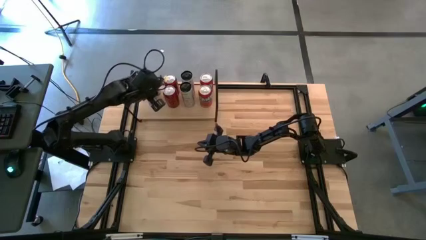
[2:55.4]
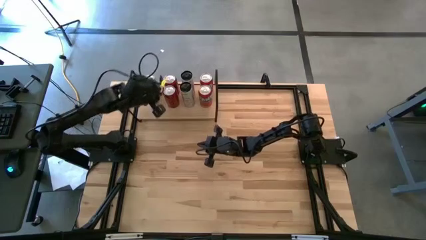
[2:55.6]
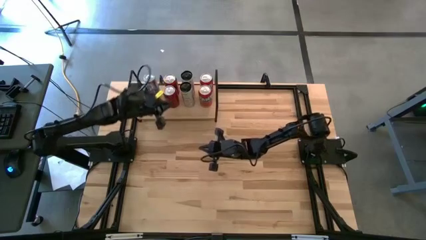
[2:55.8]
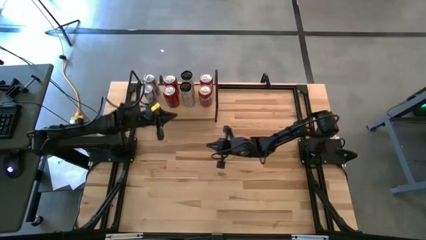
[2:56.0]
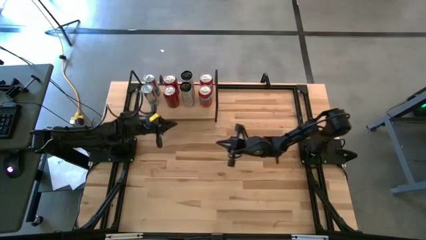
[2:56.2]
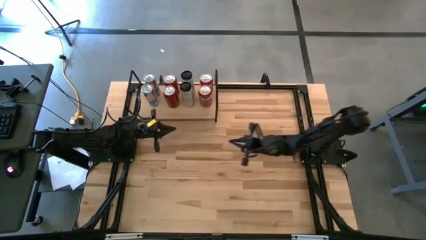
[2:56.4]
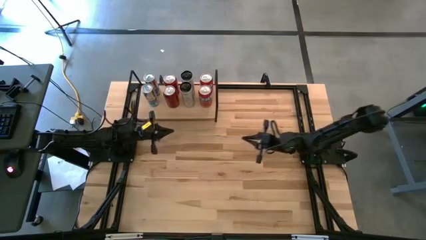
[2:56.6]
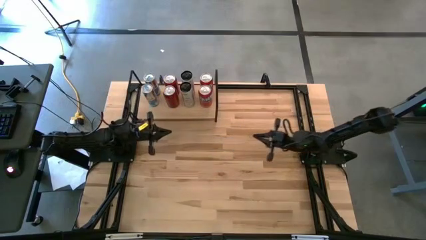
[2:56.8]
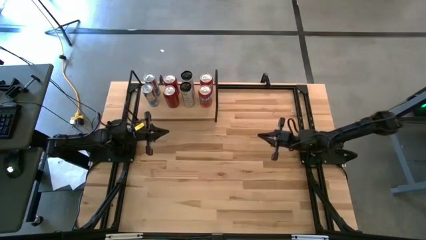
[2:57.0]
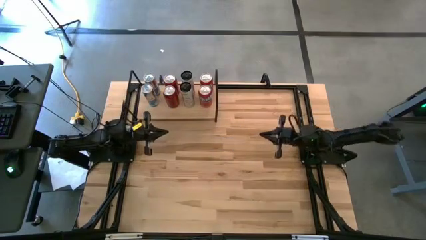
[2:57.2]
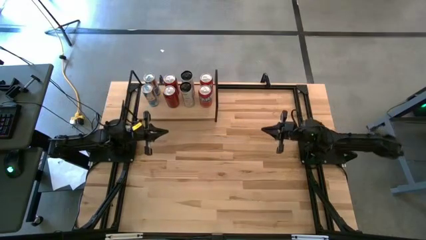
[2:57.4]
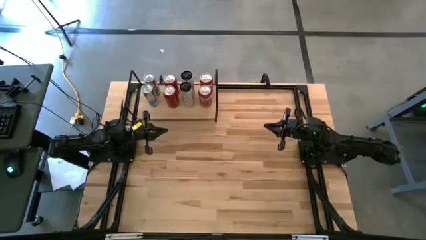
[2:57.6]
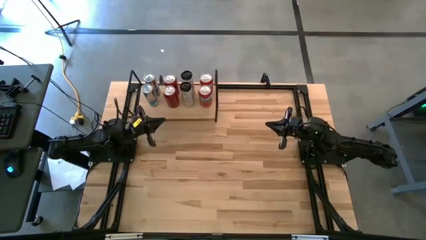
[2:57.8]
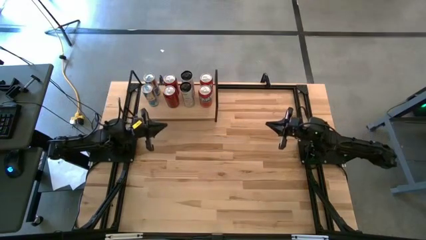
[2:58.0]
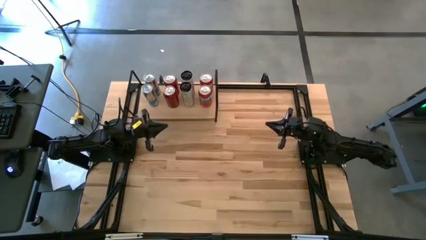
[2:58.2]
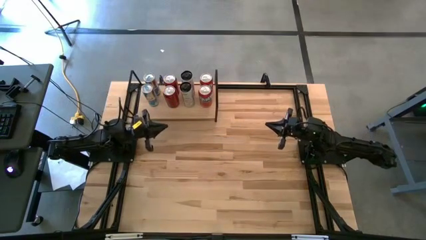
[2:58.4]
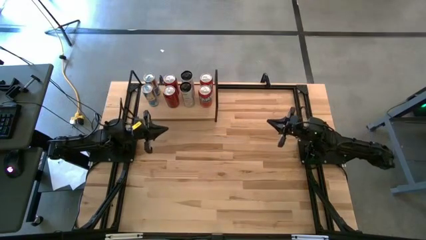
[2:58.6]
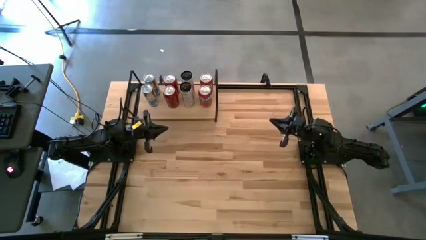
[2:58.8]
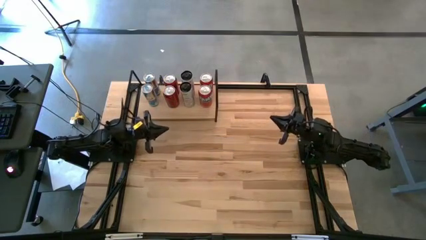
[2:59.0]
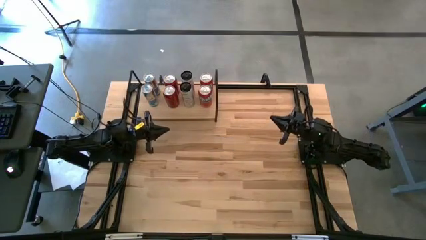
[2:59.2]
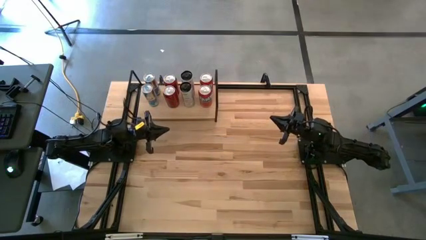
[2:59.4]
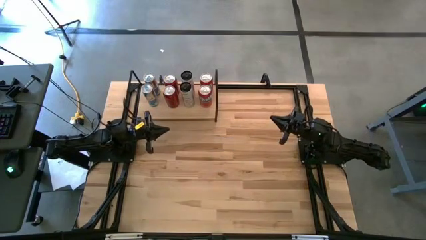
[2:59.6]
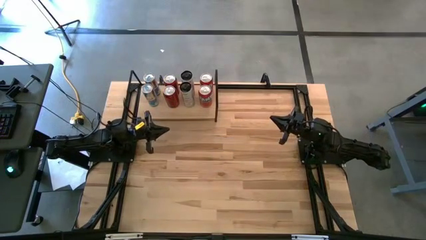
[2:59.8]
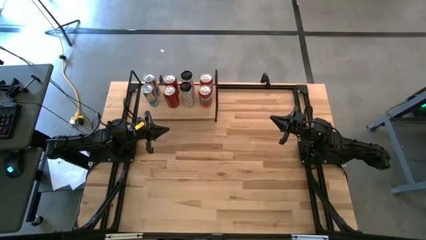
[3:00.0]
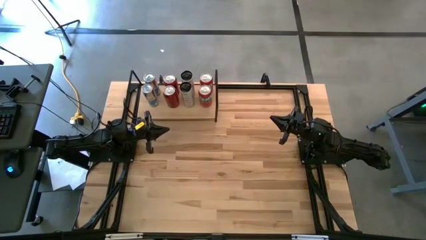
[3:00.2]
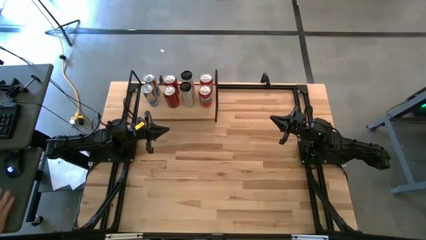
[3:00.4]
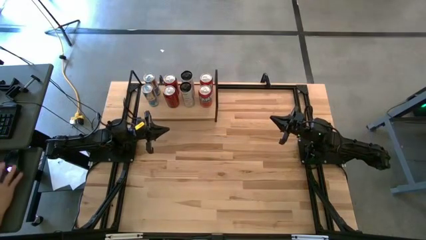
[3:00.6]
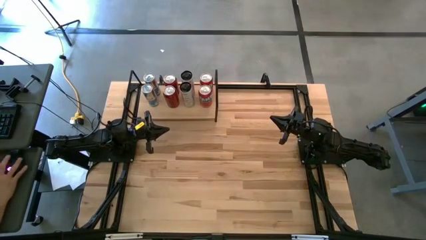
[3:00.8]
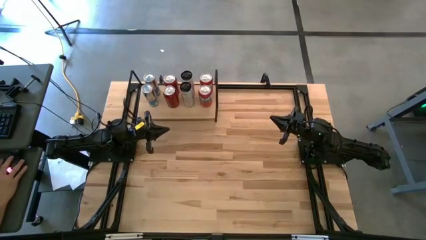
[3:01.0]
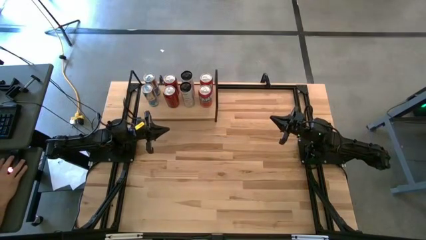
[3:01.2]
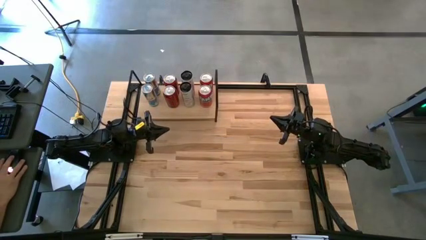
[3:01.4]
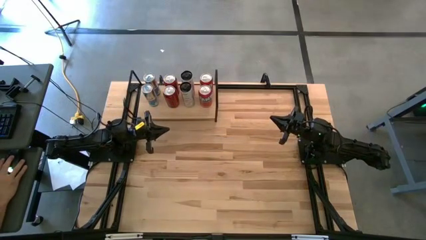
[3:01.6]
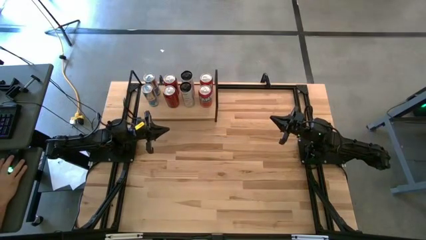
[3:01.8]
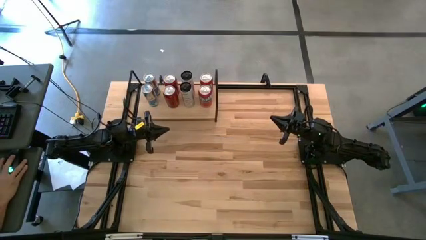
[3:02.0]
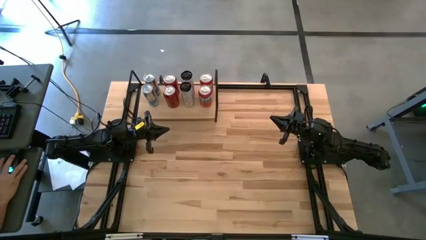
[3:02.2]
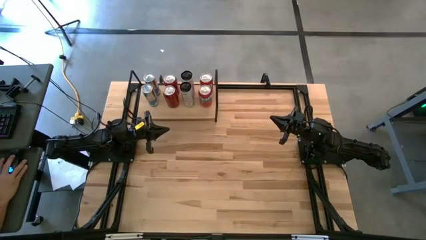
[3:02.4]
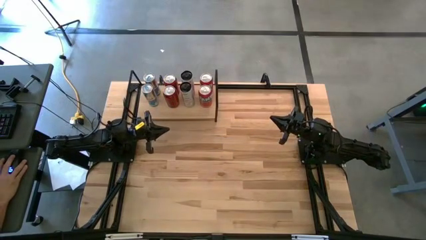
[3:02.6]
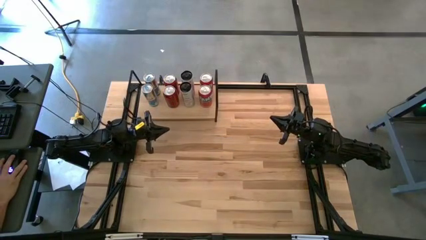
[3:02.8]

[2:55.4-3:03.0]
Task: Place canned beverage on shelf
Return to Home Position

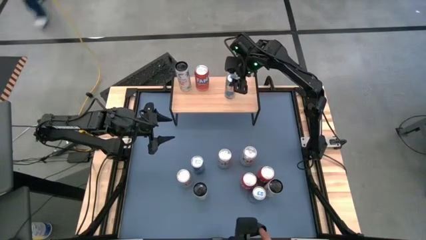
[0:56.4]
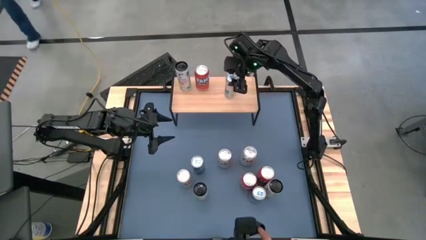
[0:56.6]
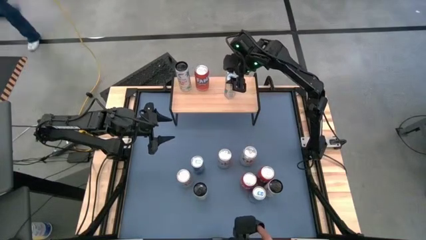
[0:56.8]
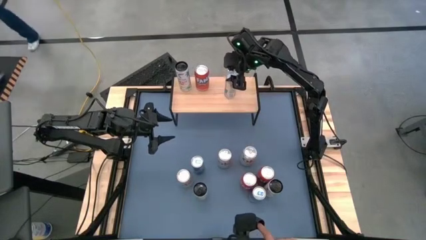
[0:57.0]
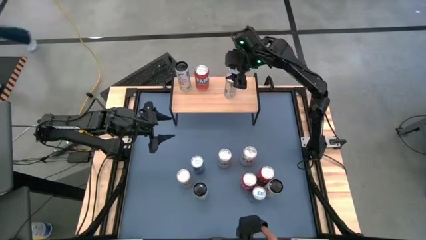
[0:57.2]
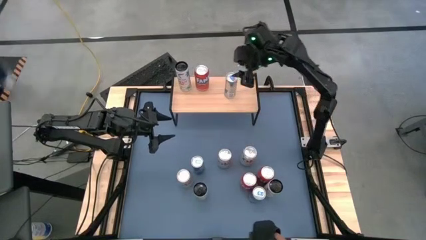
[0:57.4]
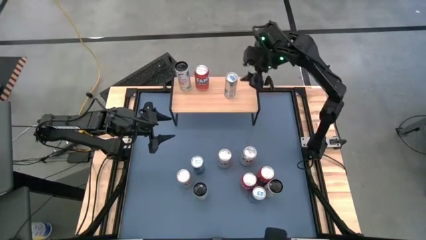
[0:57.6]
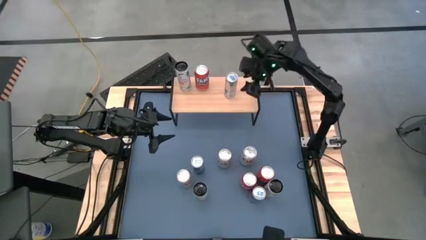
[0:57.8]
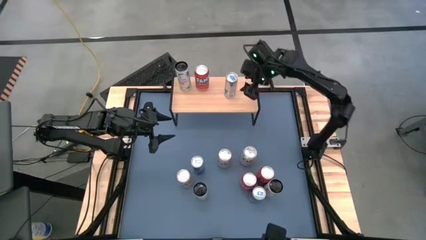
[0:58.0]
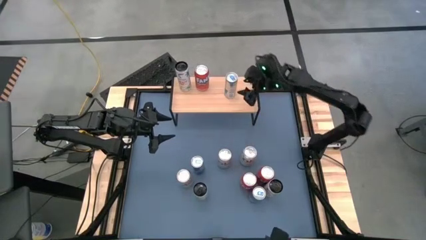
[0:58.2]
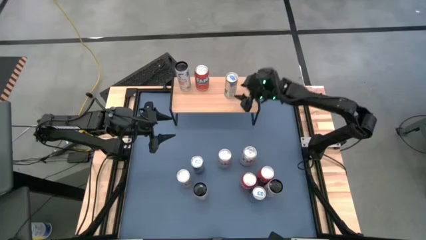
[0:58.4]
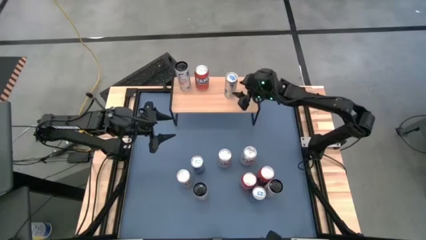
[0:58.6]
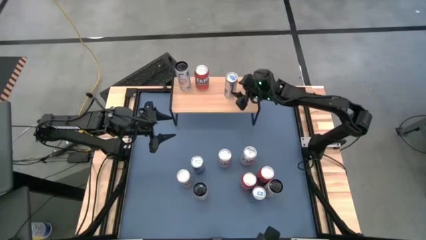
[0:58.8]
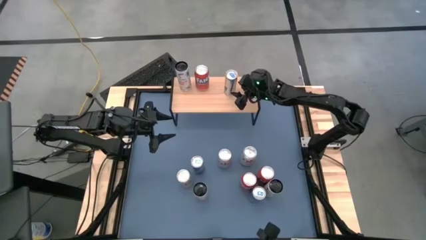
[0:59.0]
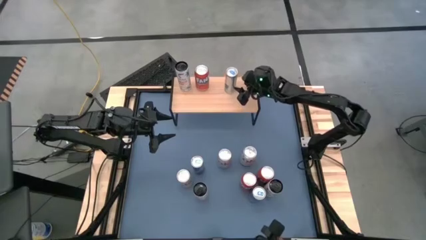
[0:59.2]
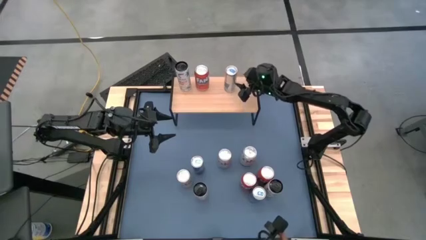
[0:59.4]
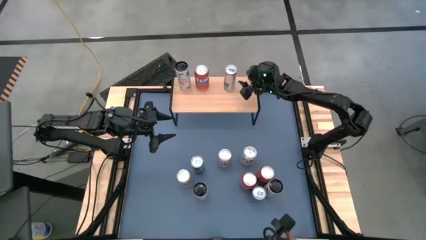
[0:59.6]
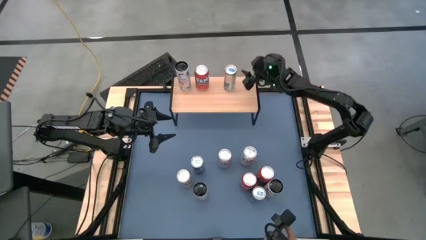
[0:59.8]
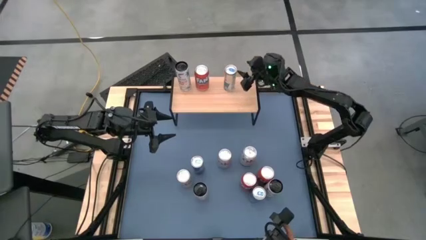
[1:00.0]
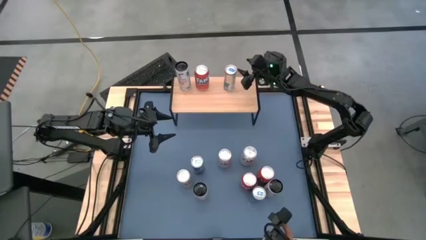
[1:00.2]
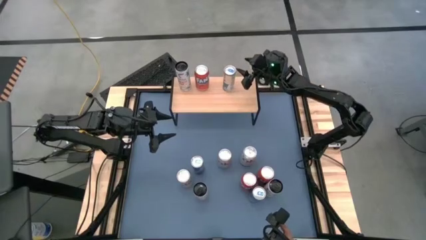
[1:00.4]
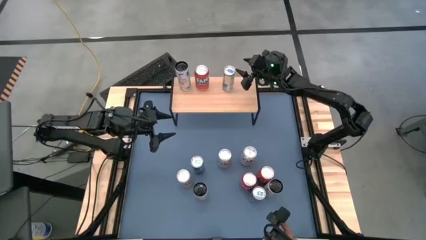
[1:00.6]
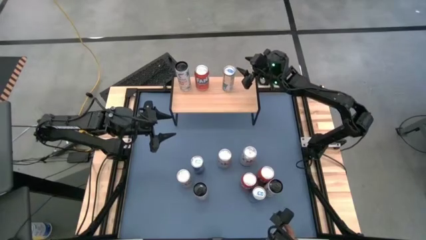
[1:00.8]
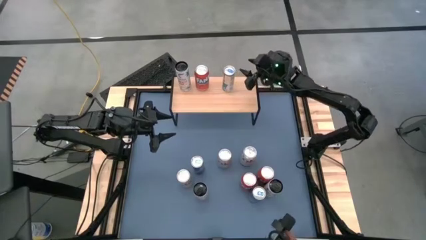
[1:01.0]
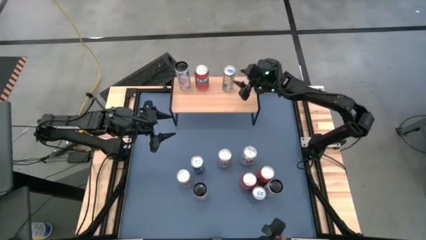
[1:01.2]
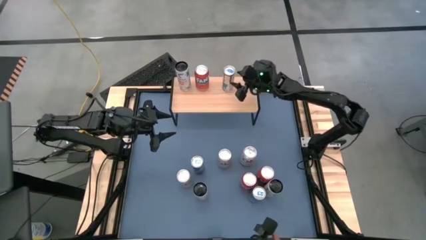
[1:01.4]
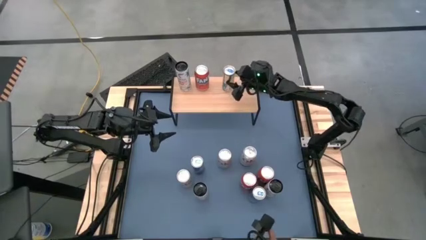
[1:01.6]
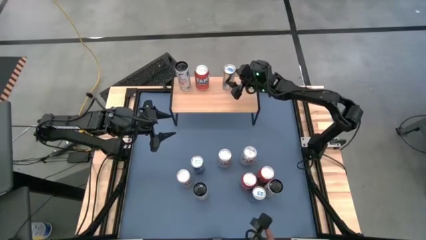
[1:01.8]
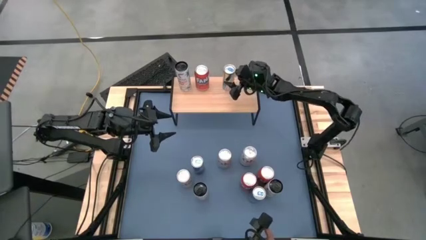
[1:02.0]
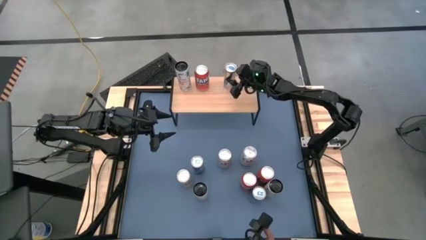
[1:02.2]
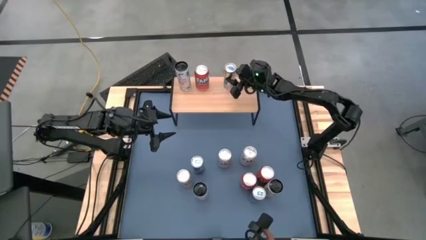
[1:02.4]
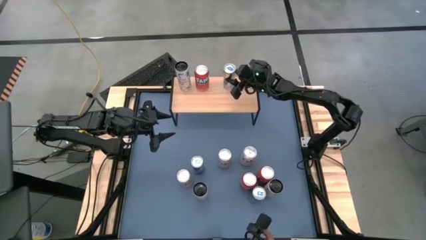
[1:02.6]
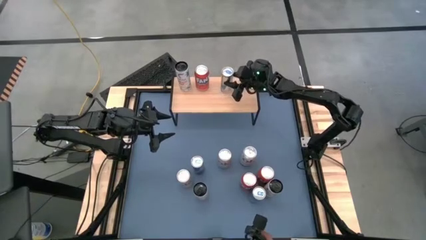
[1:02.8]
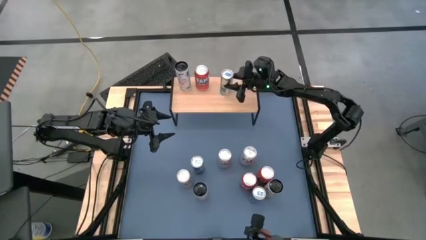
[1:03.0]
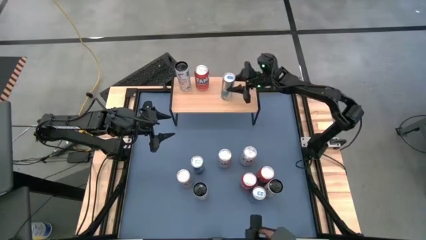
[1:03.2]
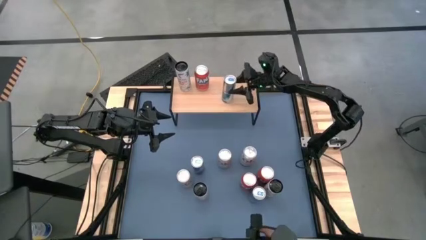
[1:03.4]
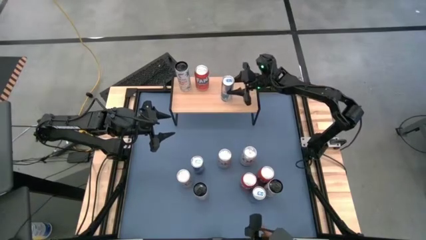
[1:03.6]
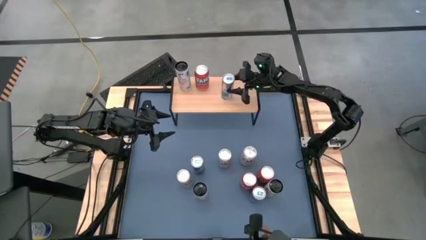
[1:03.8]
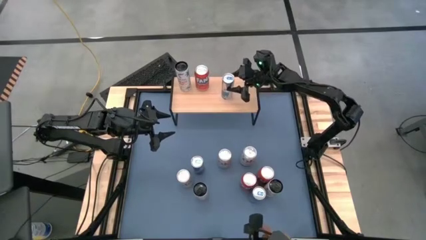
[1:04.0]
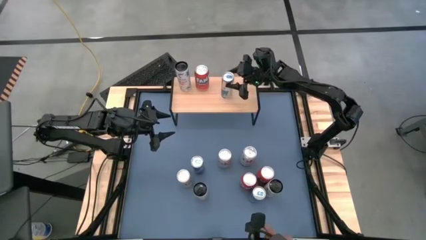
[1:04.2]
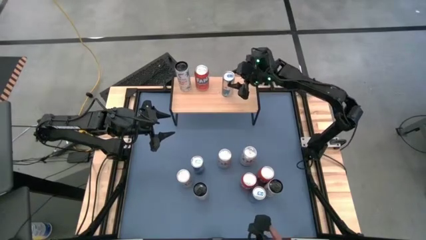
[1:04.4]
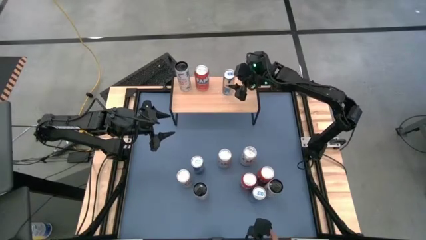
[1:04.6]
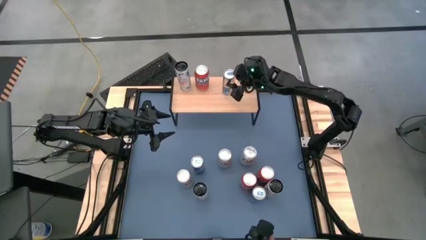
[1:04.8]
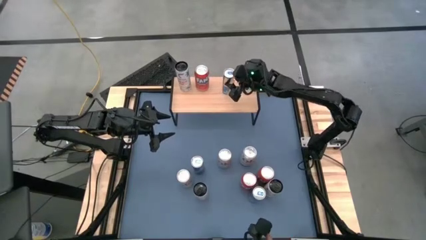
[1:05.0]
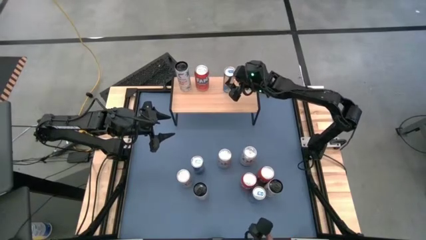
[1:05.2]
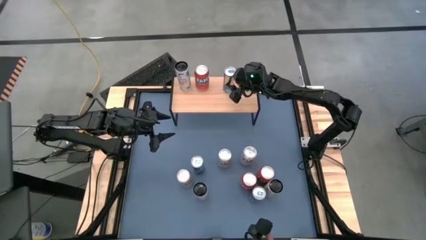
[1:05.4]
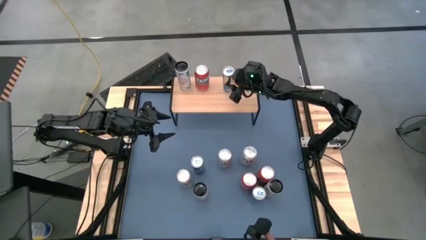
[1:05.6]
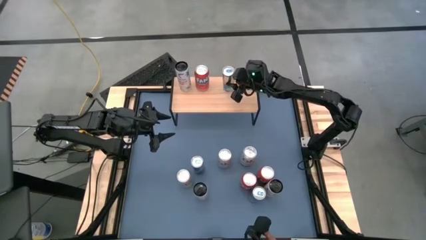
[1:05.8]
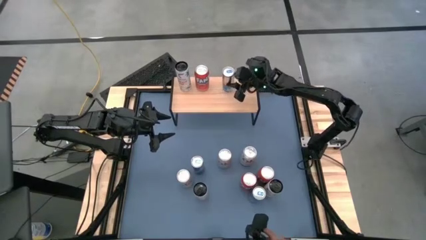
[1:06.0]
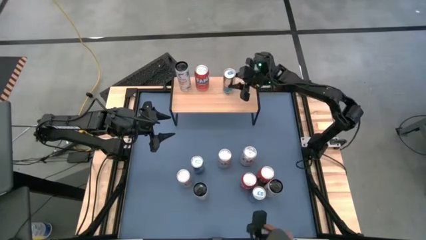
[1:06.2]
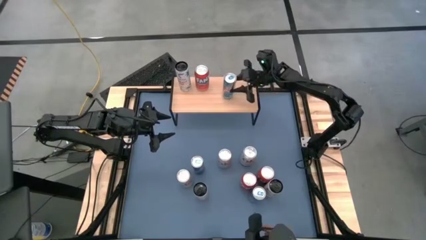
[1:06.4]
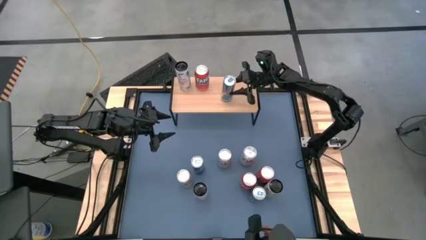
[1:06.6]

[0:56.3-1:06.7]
Task: Place canned beverage on shelf
Adjust the blue soda can
